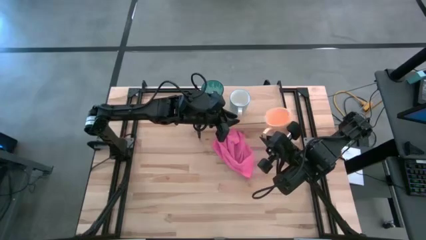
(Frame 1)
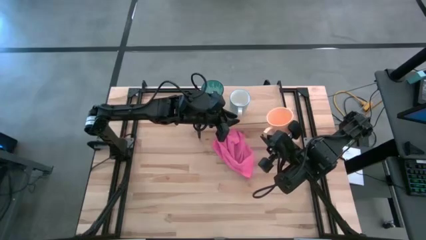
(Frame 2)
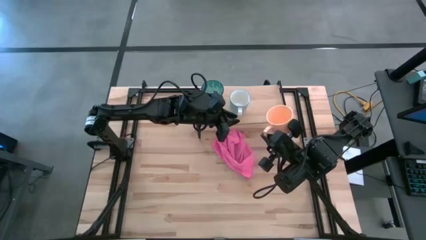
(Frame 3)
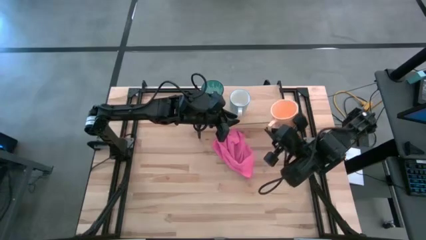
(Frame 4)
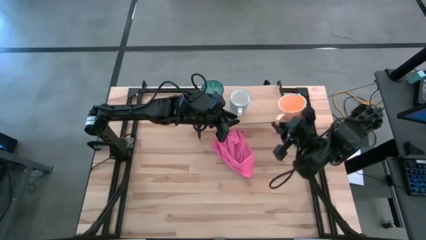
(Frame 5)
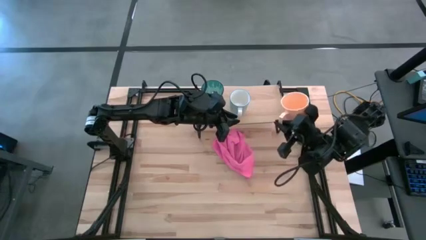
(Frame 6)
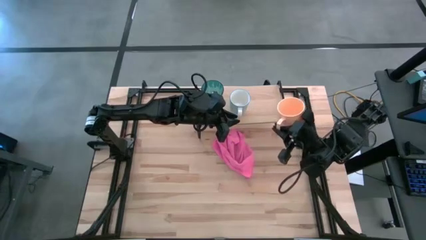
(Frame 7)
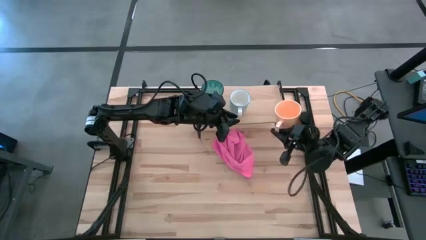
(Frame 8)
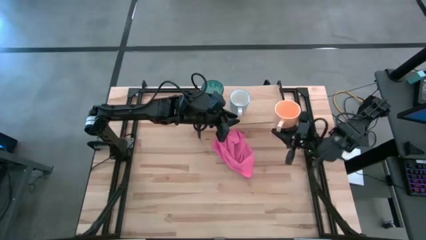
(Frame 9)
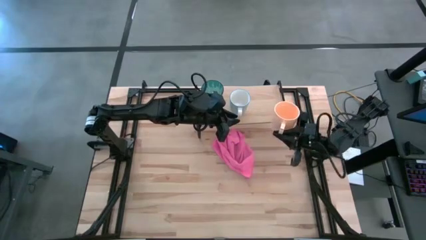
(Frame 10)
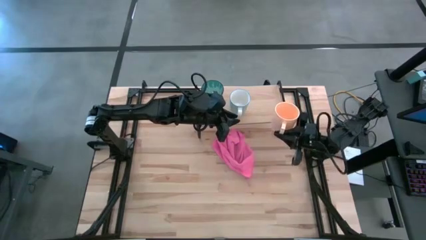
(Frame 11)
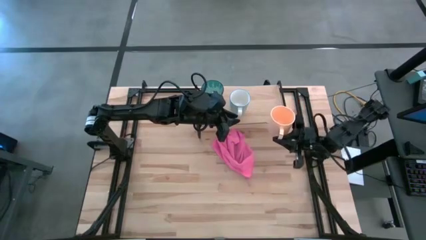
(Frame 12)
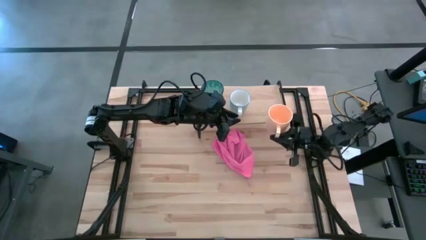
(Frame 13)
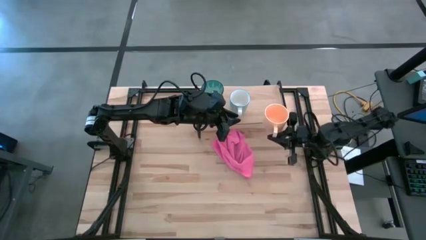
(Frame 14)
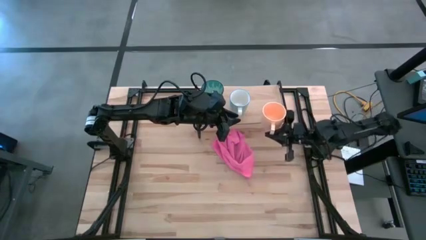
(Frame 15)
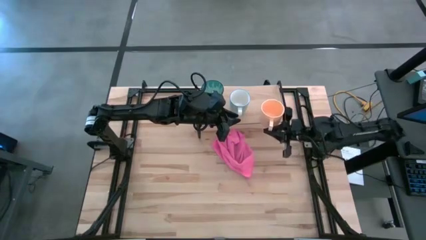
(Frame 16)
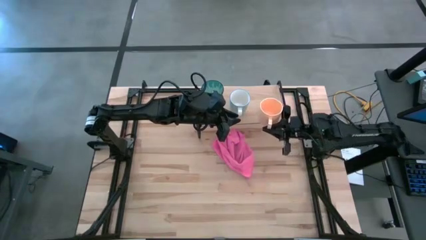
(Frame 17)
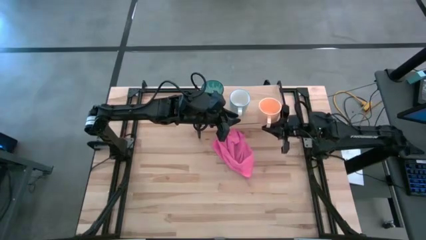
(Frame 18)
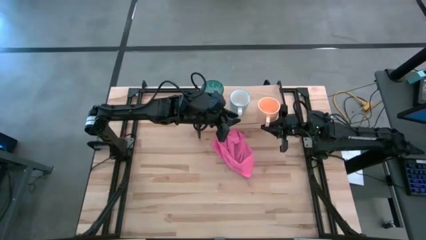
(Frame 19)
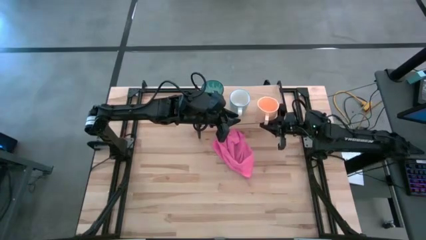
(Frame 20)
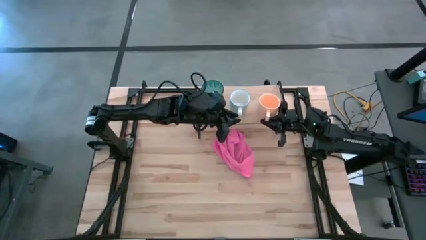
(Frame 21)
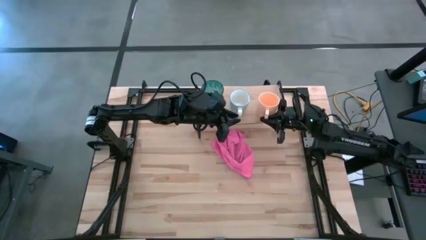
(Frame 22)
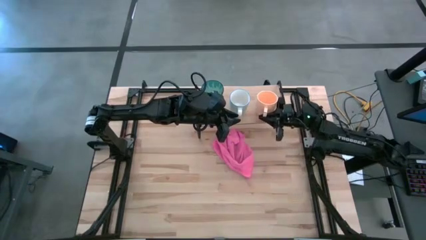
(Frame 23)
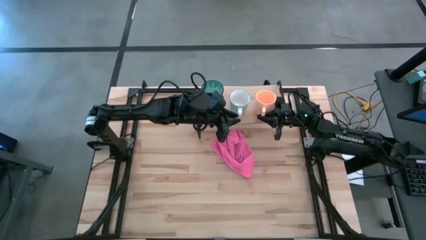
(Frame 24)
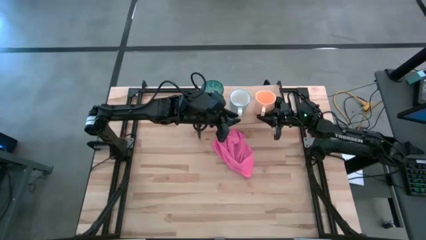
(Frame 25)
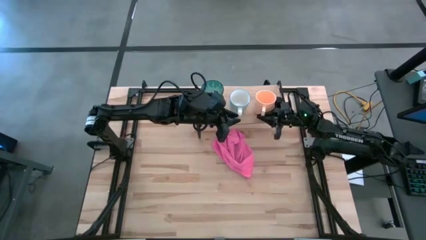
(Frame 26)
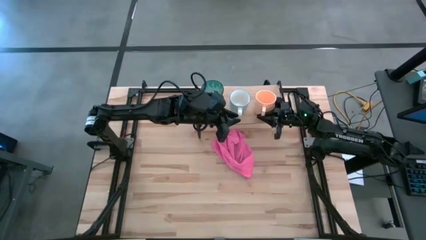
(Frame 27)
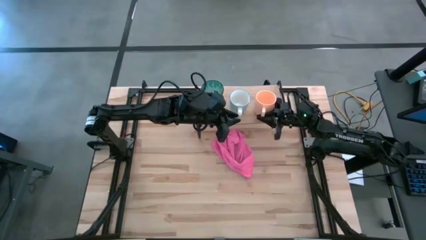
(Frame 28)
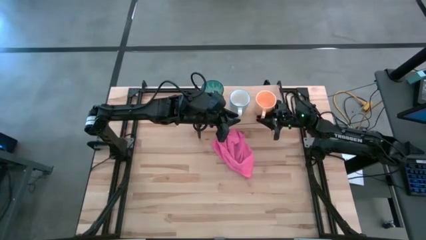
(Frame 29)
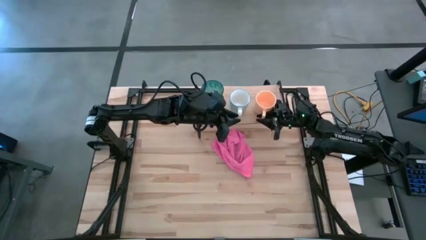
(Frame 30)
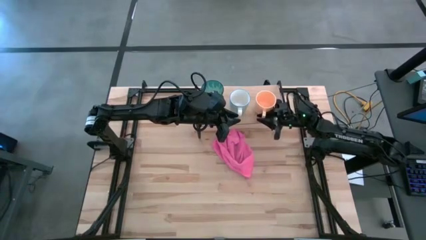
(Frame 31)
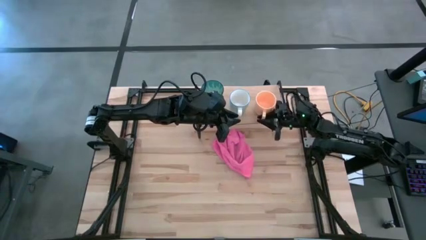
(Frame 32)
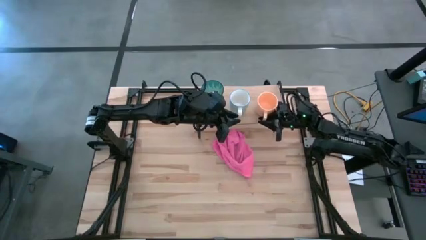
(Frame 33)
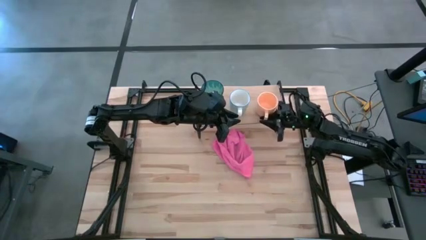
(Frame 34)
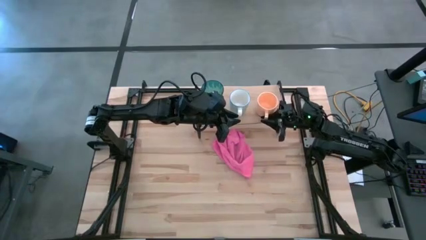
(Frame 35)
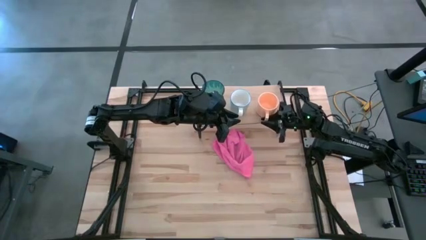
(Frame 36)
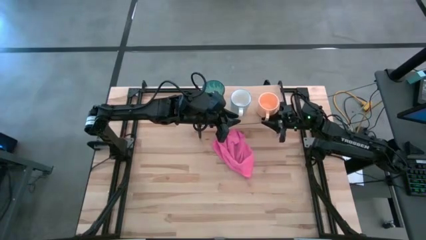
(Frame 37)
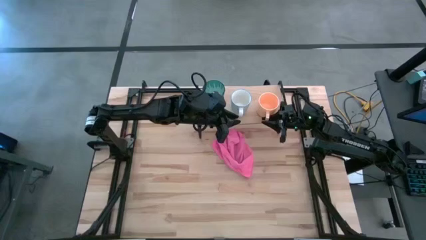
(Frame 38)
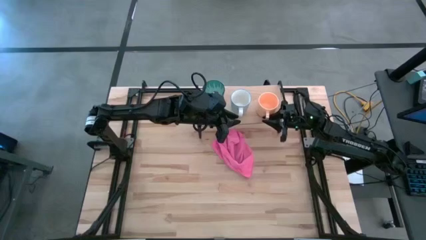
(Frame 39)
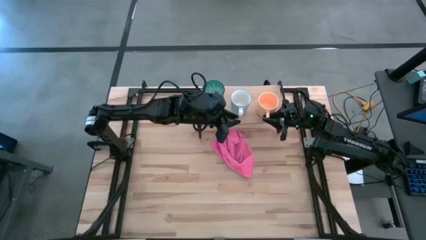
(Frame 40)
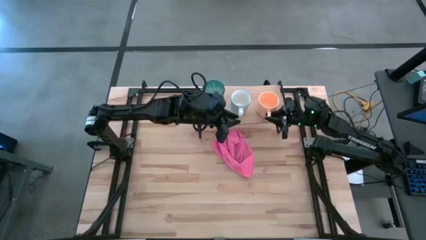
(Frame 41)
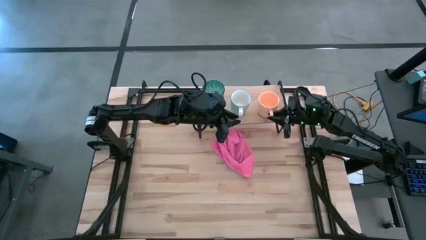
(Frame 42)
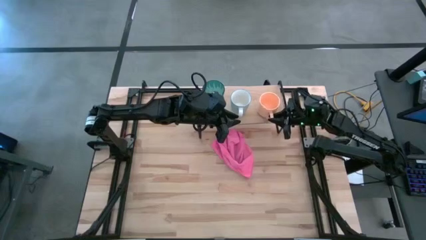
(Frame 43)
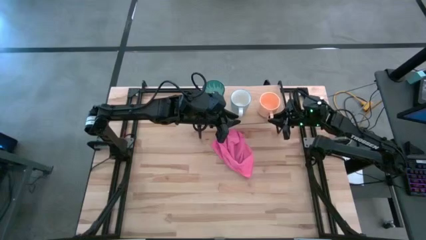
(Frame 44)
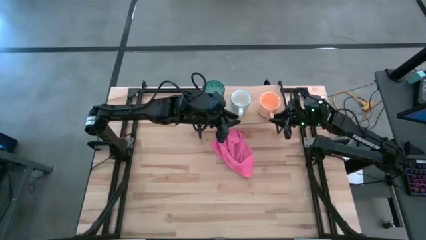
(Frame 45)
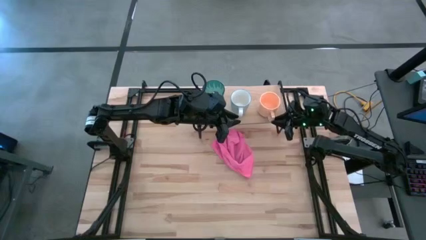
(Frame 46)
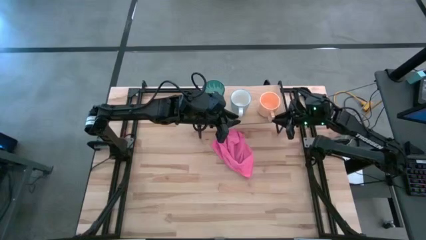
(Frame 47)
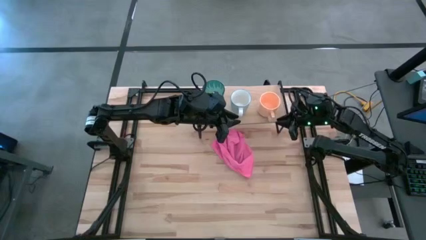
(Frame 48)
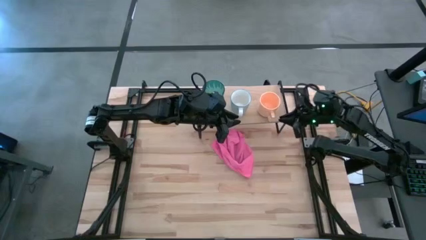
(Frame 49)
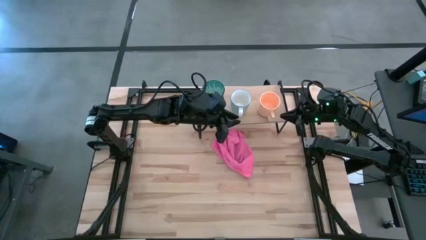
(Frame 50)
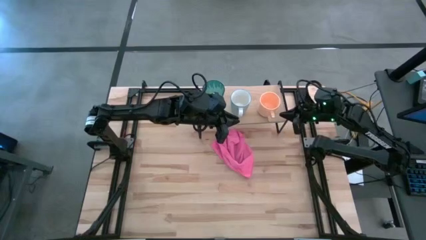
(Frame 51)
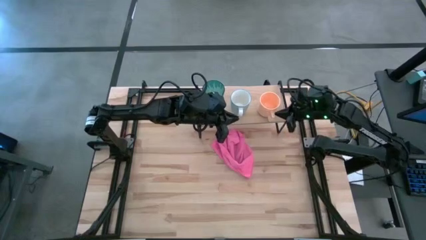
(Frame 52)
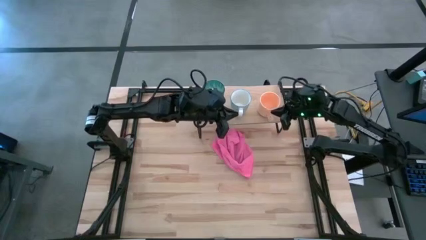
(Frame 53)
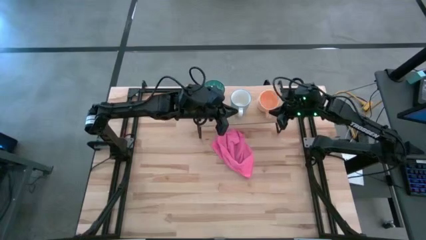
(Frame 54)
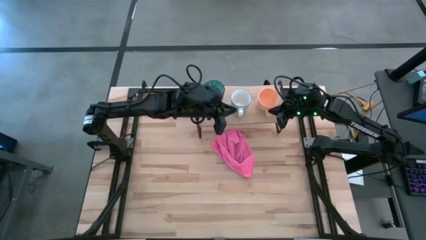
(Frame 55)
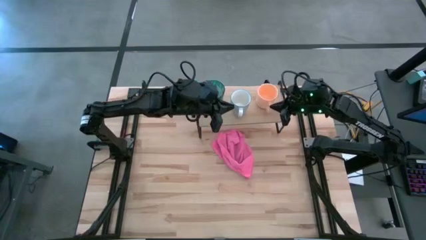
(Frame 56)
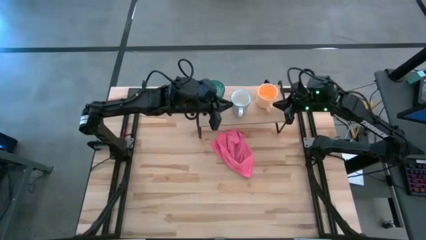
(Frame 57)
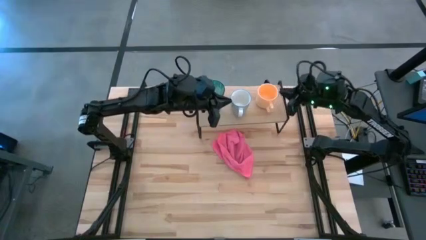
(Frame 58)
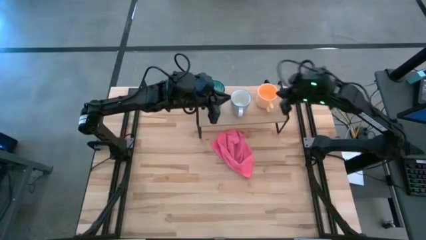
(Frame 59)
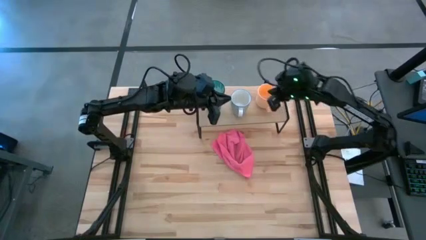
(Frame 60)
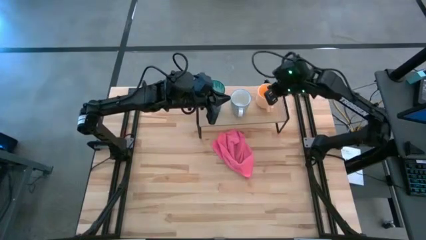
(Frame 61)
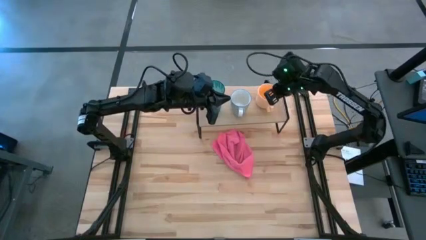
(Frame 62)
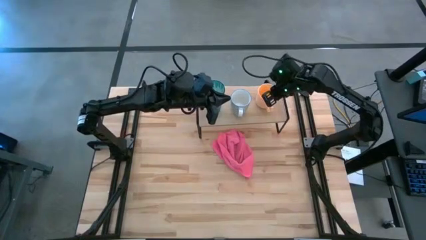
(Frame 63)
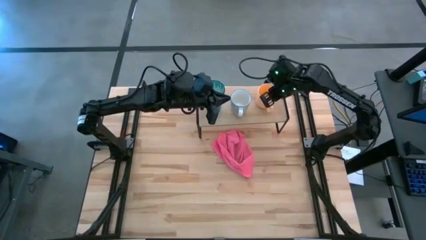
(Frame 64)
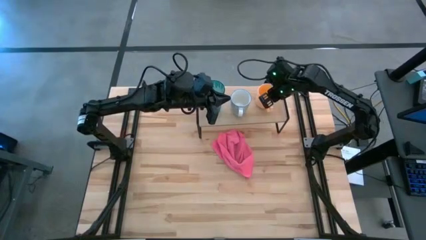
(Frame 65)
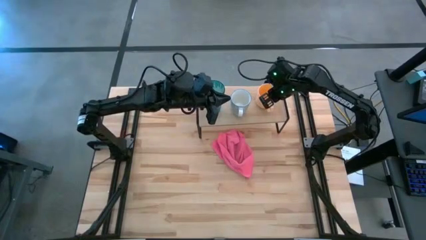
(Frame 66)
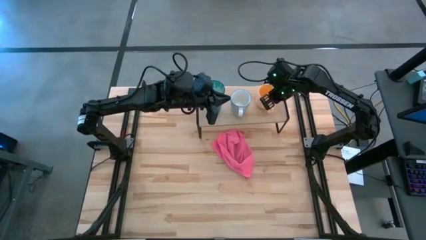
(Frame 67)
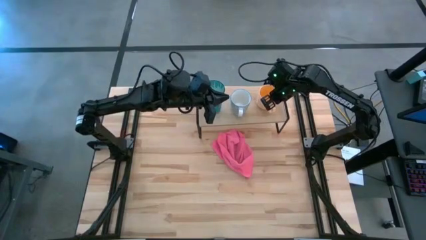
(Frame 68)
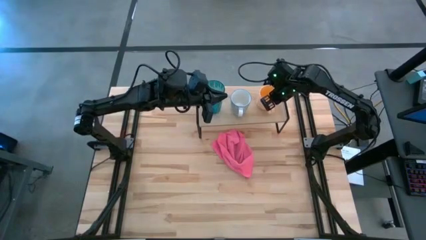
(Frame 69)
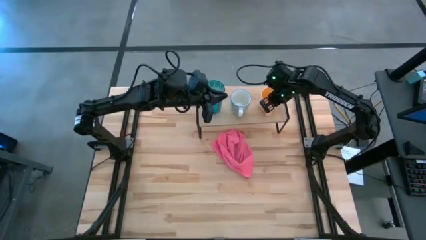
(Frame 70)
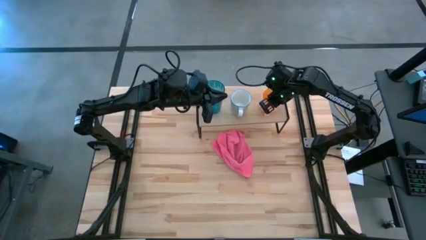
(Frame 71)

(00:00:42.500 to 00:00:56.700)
Task: Stack small to large cups/mugs on shelf
Put the yellow cup on the shelf
